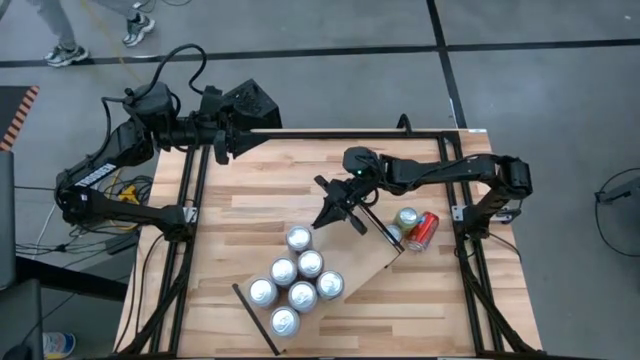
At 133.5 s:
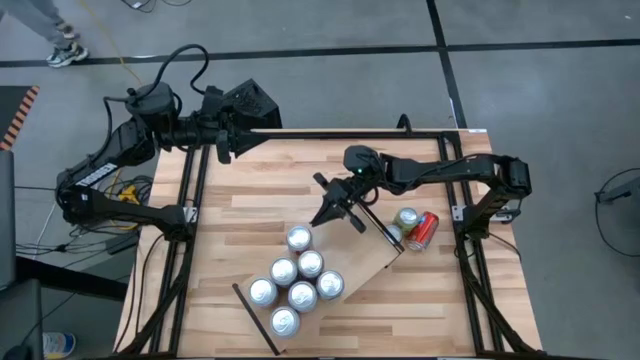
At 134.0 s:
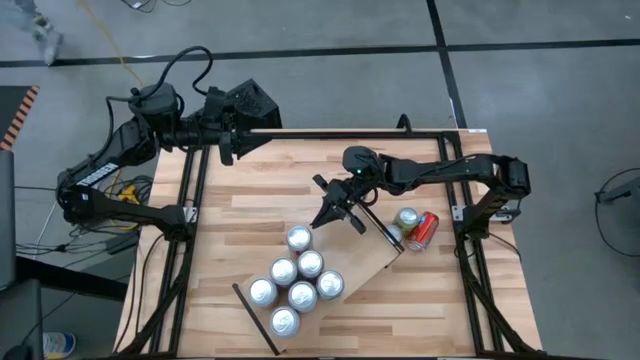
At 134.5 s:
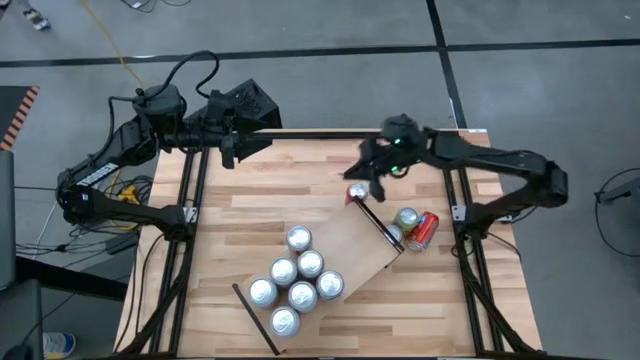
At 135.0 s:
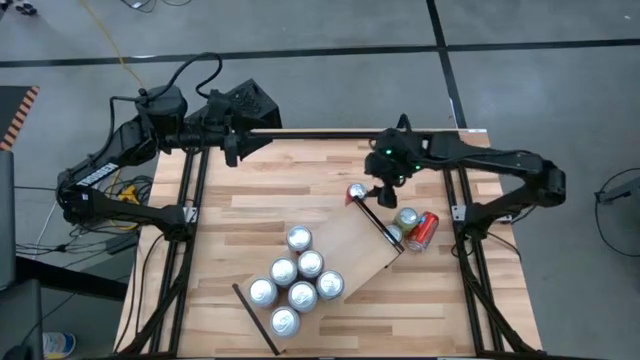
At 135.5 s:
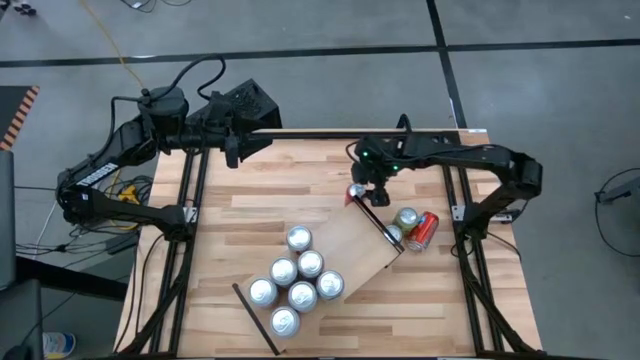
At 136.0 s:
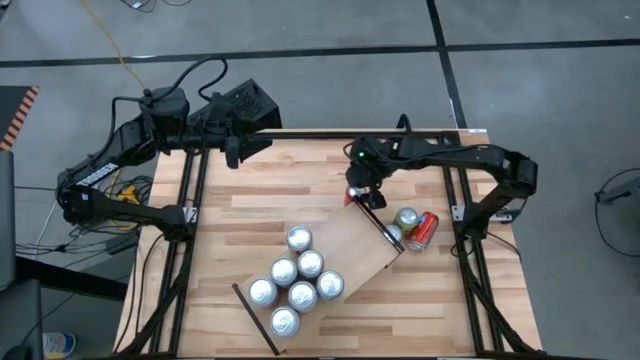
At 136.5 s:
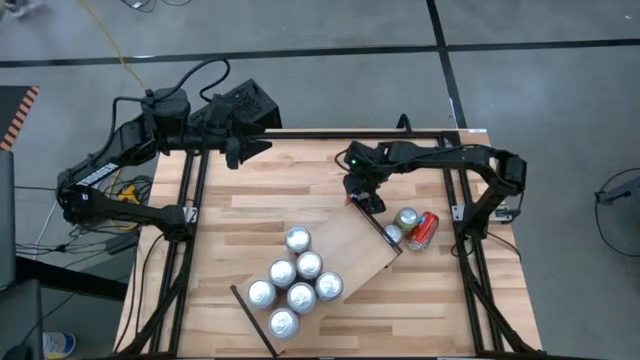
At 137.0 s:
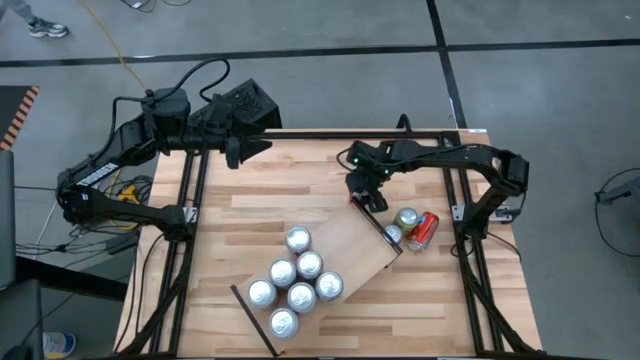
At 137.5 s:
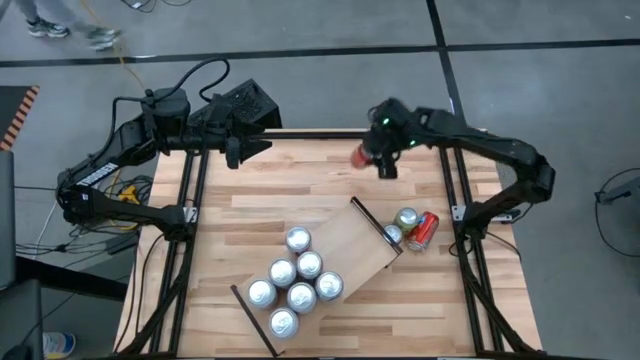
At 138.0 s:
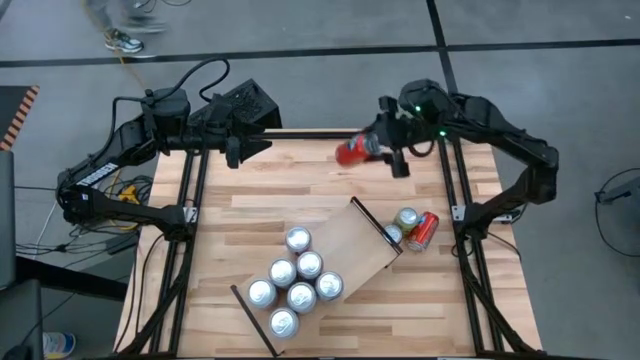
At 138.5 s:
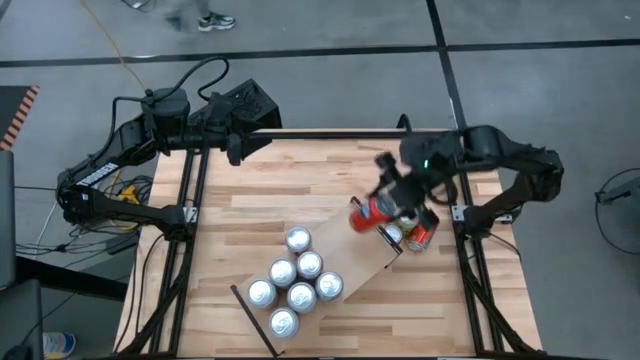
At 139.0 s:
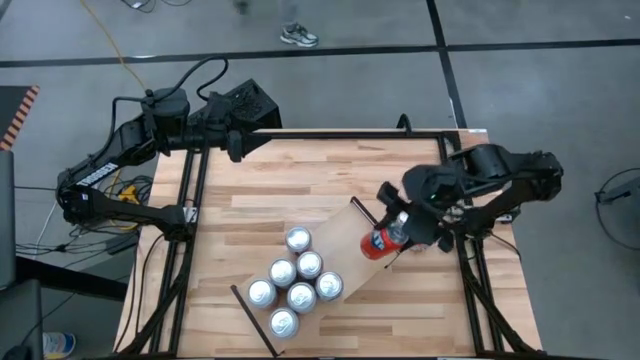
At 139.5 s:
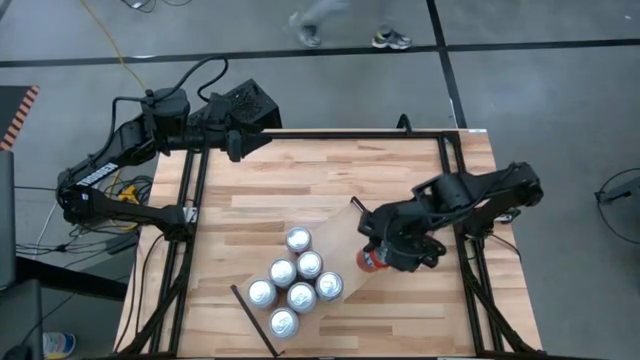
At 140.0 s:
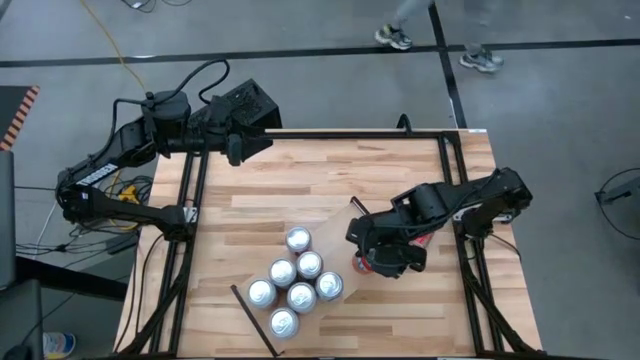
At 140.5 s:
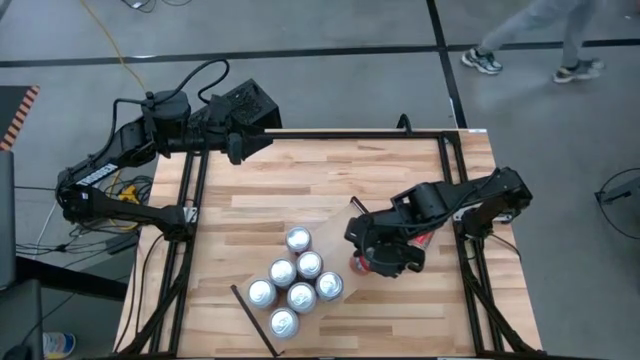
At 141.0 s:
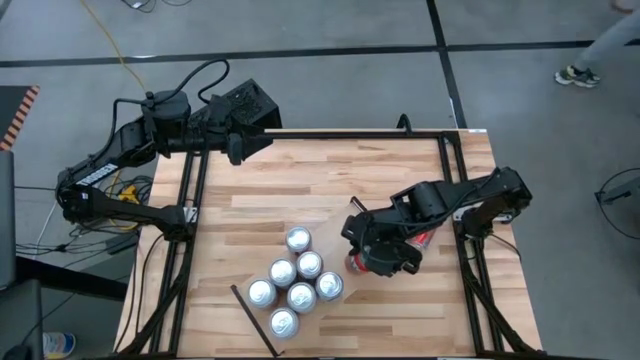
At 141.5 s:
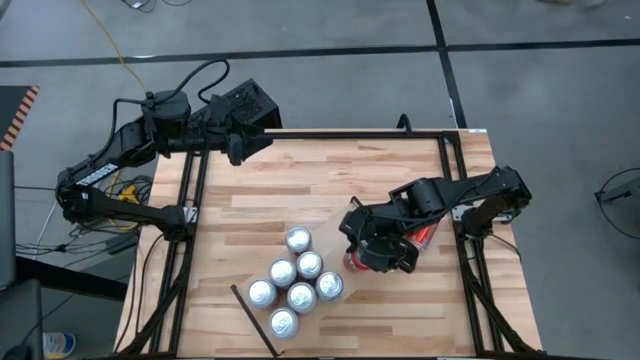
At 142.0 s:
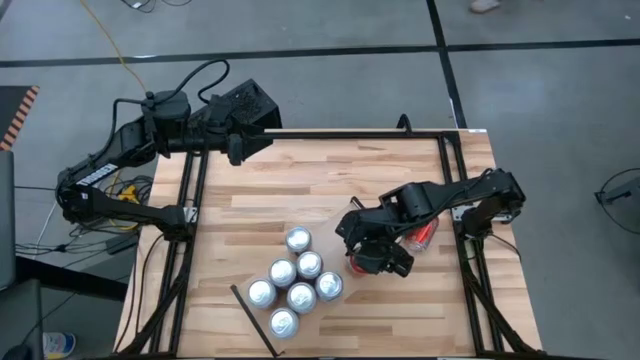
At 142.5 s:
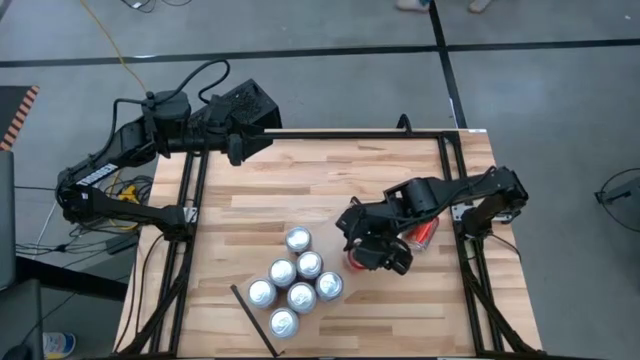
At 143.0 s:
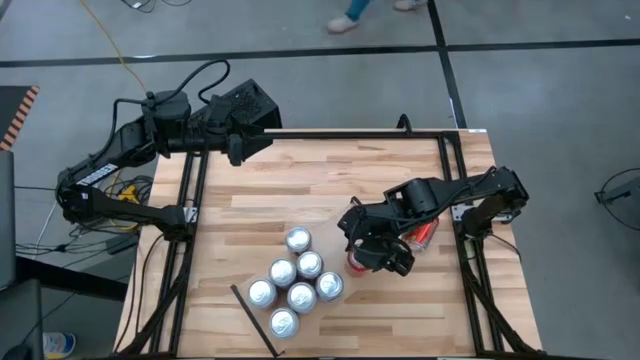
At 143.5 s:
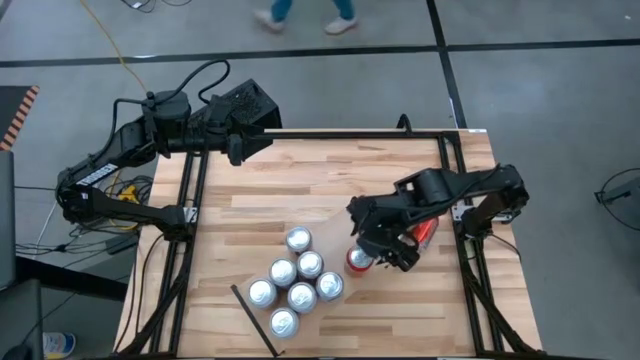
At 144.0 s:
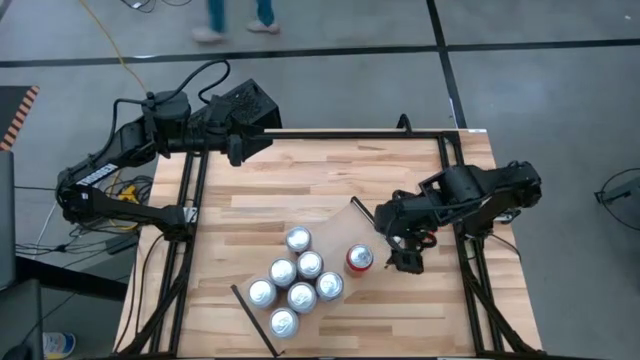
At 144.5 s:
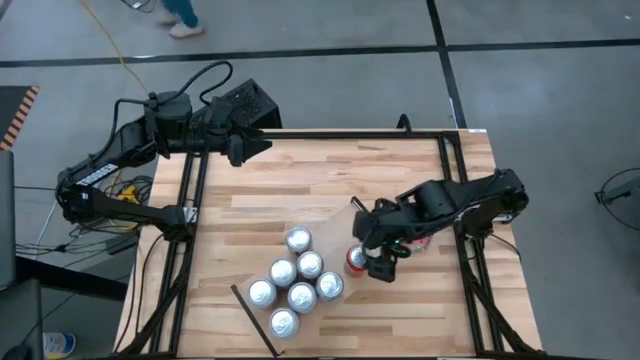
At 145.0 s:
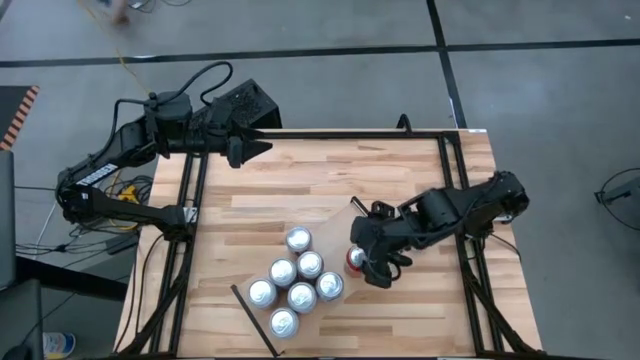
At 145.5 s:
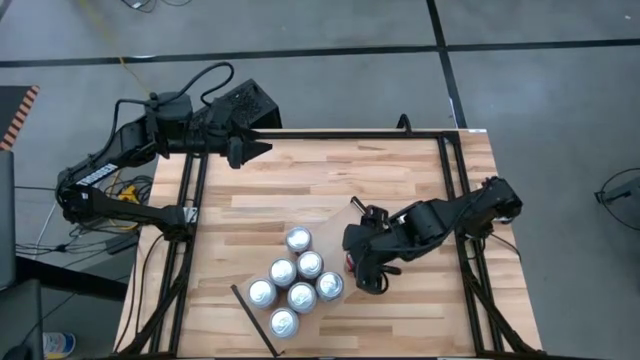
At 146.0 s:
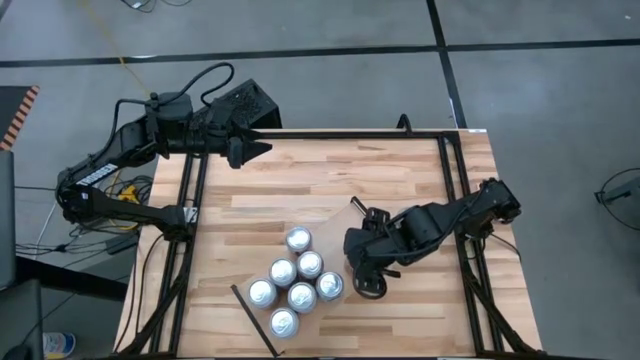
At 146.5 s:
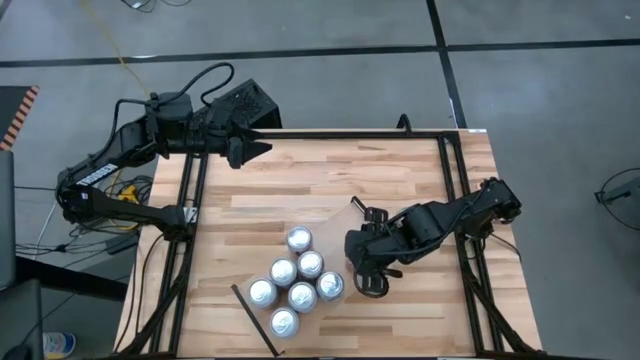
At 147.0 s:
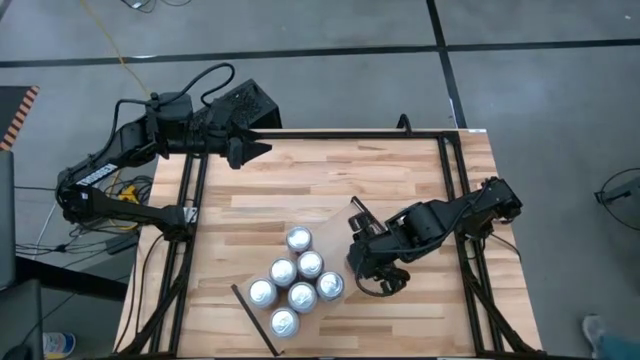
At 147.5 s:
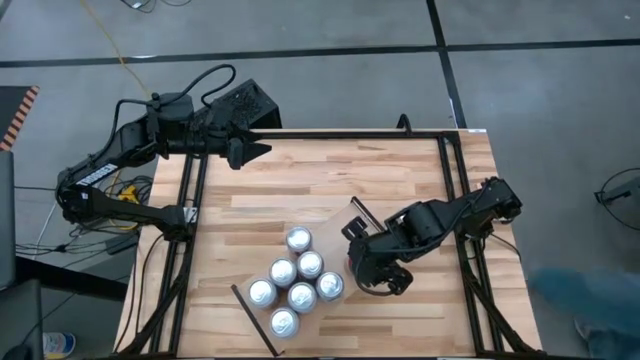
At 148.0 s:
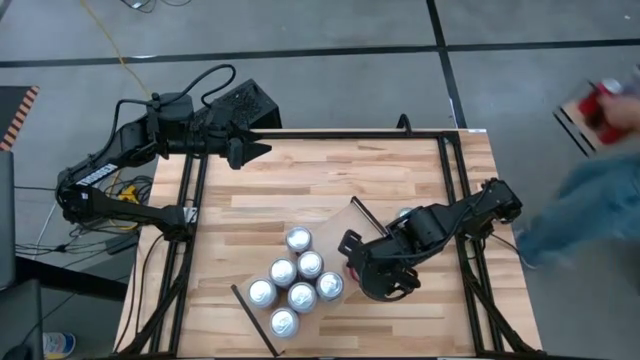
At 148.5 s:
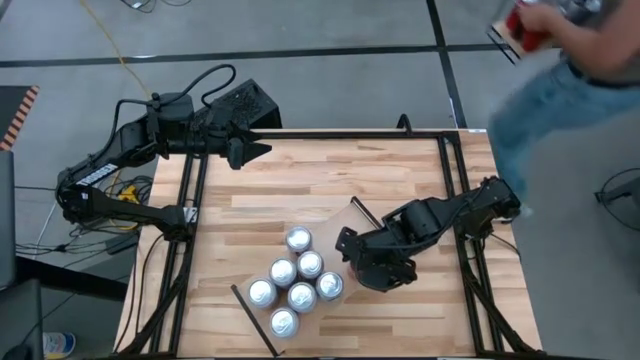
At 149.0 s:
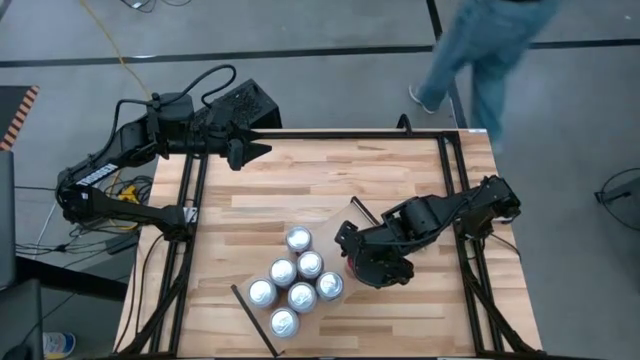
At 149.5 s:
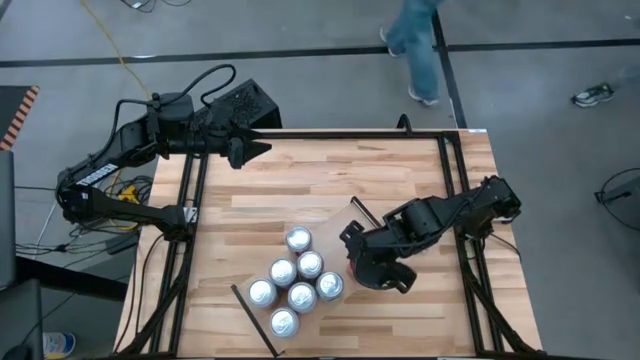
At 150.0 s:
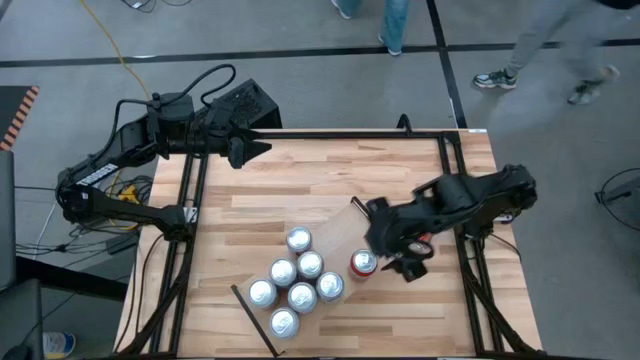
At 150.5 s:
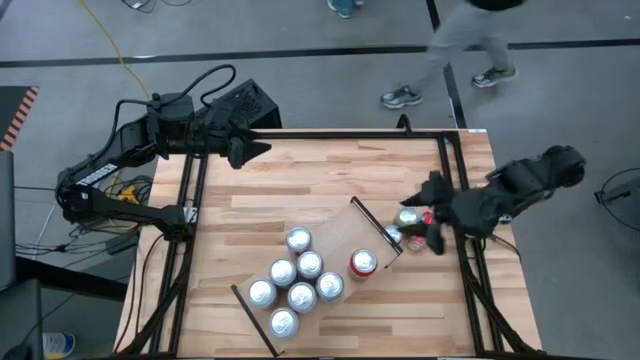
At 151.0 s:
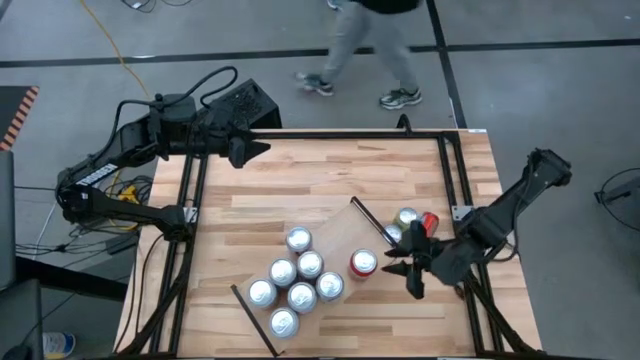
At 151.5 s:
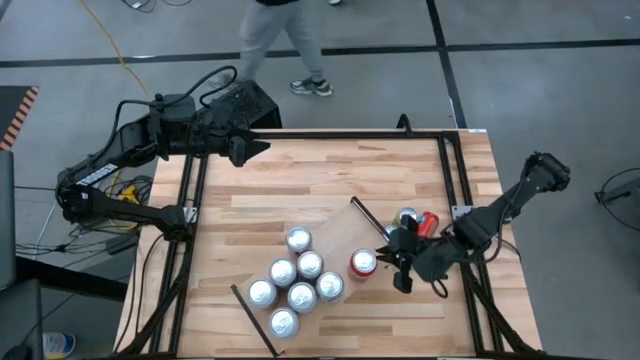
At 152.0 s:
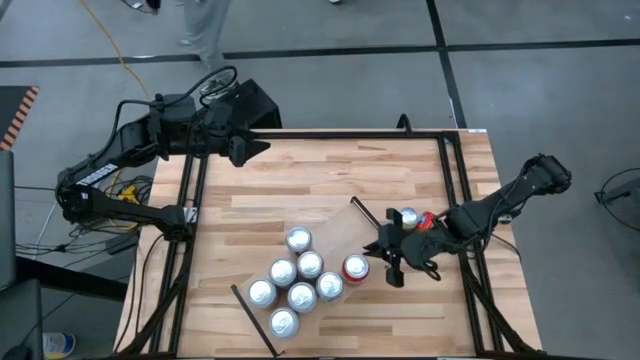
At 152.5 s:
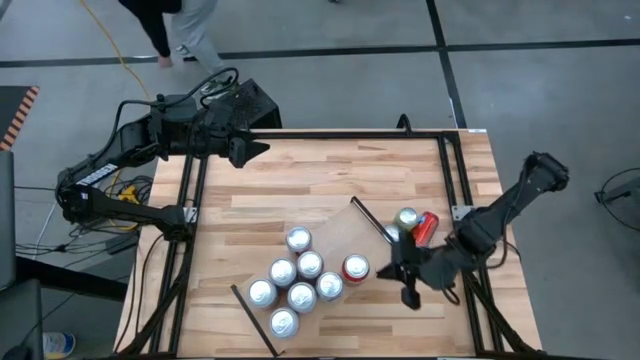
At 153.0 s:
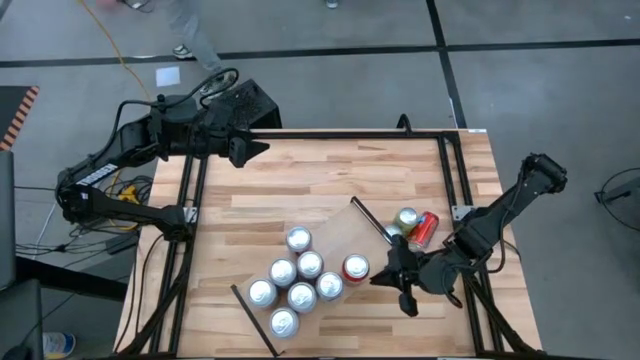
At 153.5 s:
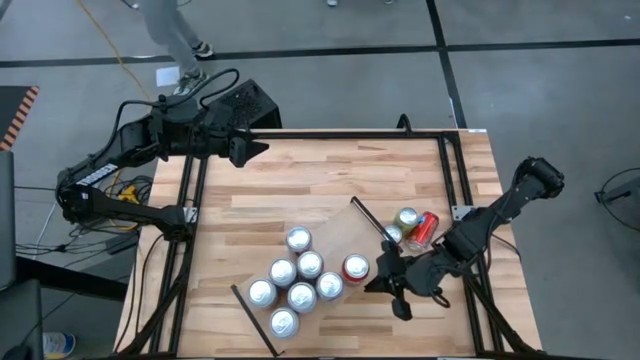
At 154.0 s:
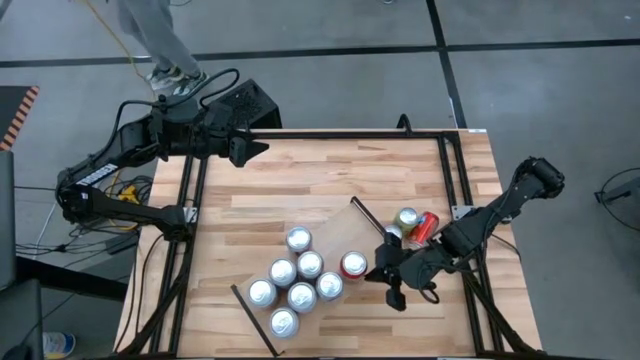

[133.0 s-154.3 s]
Task: Place canned beverage on shelf
Put the red soda can on the shelf

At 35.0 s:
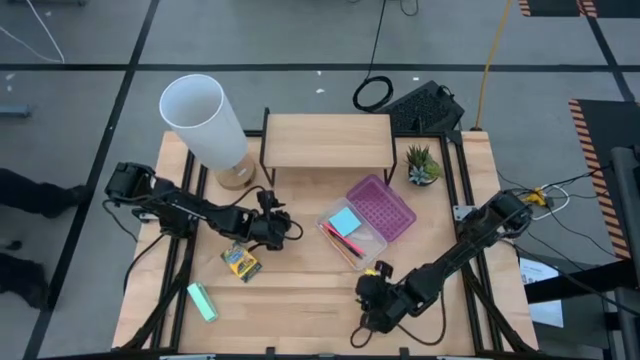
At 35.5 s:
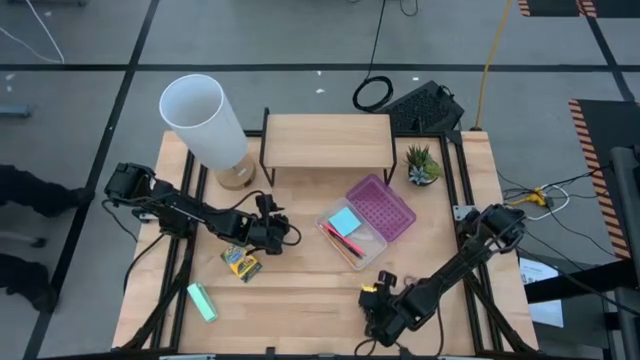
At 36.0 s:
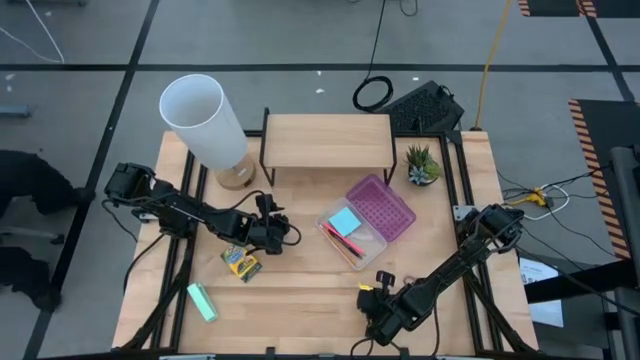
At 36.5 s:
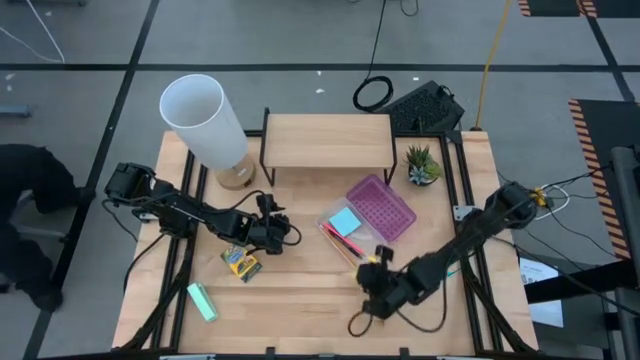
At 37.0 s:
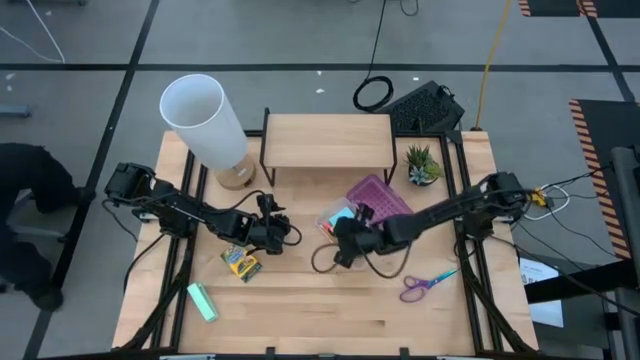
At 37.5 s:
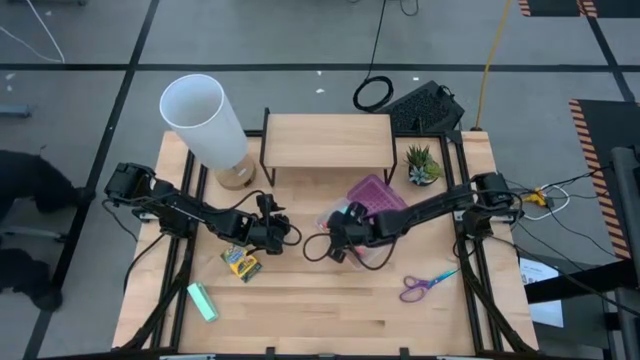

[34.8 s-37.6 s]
Task: Pack school essentials
Put the yellow sticky notes into the transparent violet supply box
